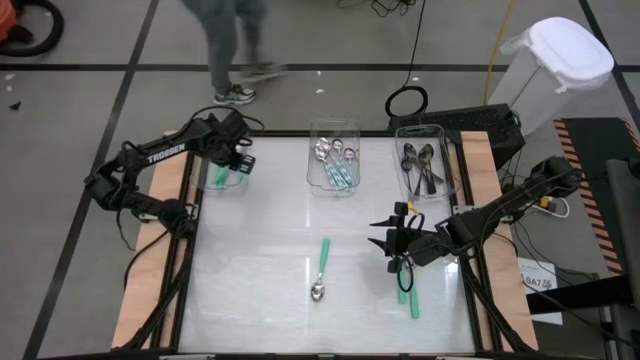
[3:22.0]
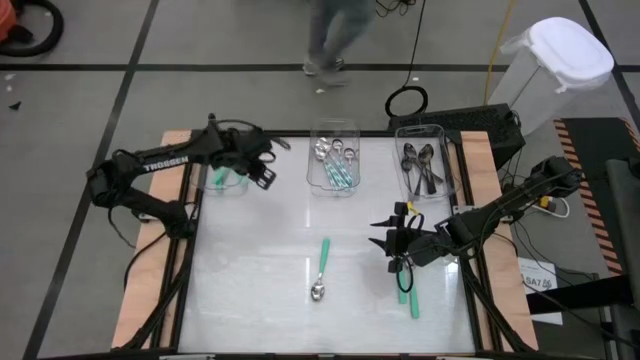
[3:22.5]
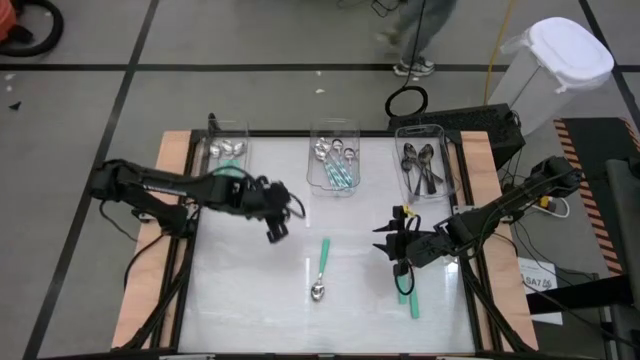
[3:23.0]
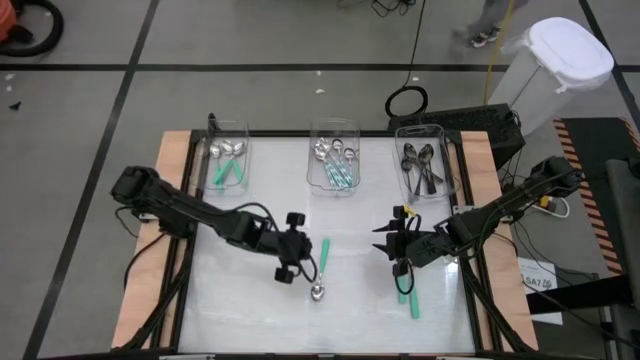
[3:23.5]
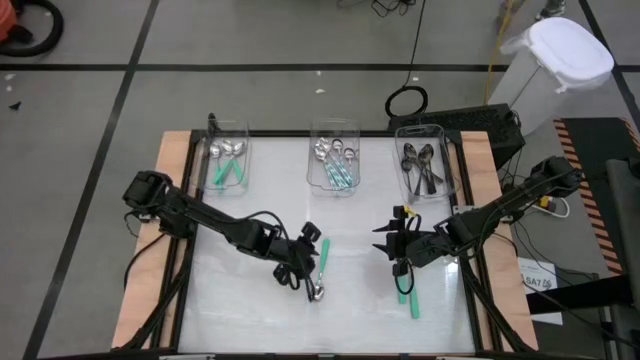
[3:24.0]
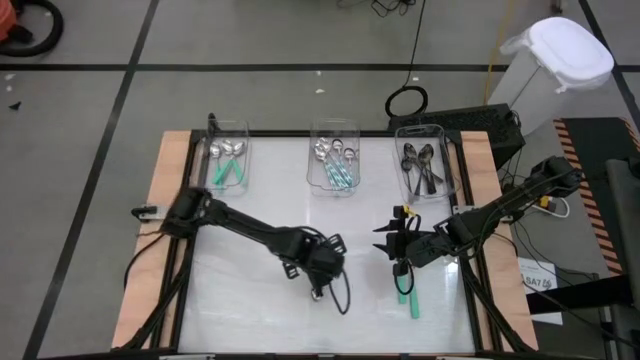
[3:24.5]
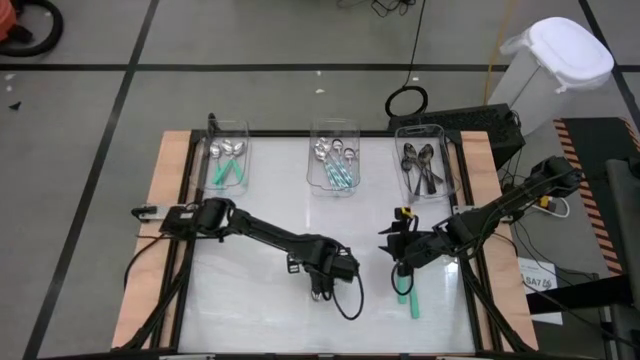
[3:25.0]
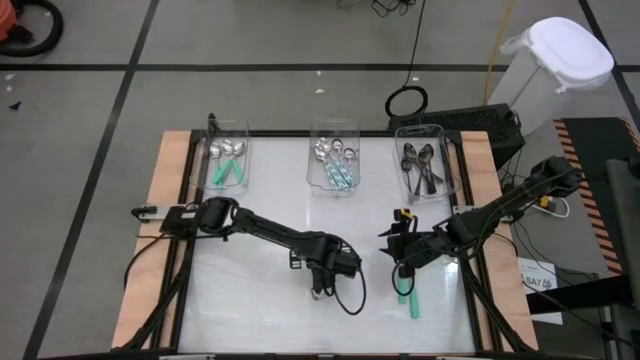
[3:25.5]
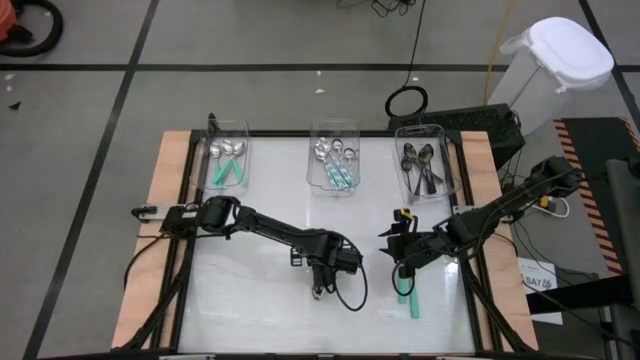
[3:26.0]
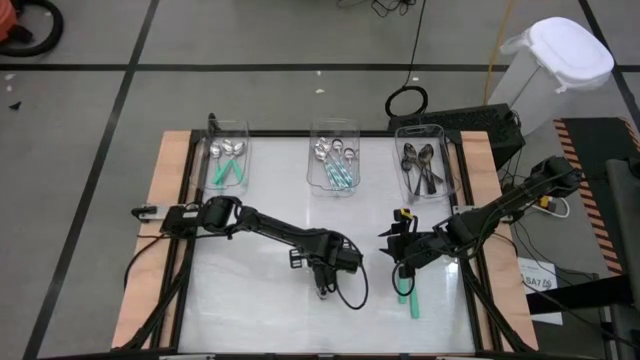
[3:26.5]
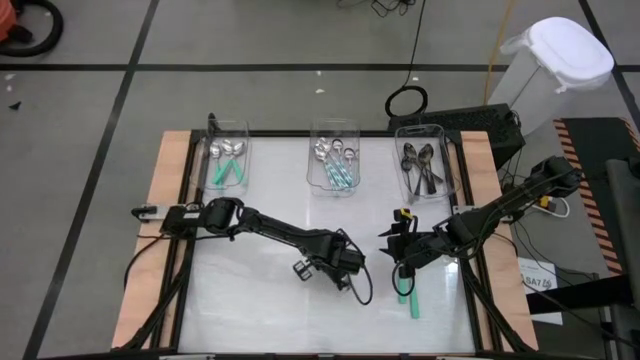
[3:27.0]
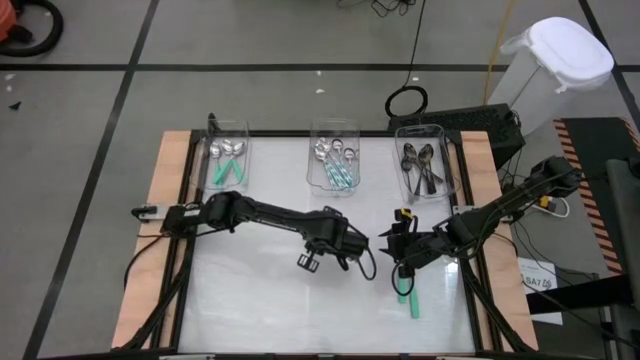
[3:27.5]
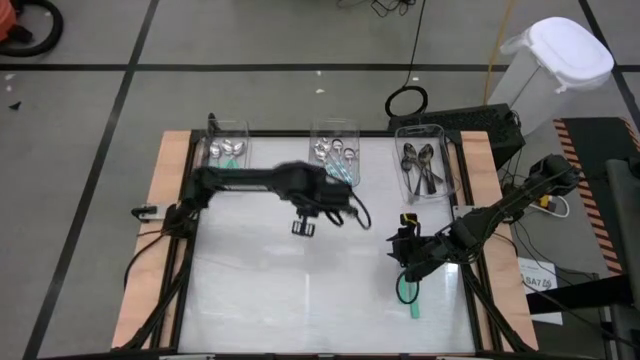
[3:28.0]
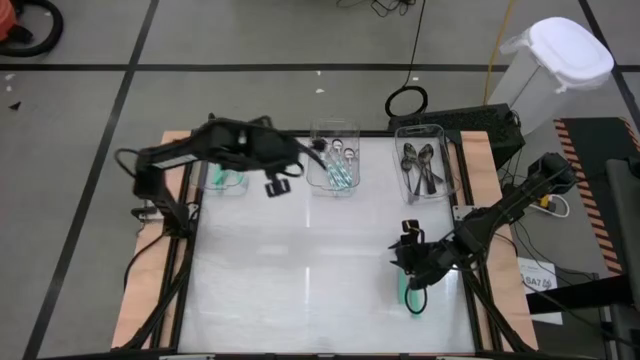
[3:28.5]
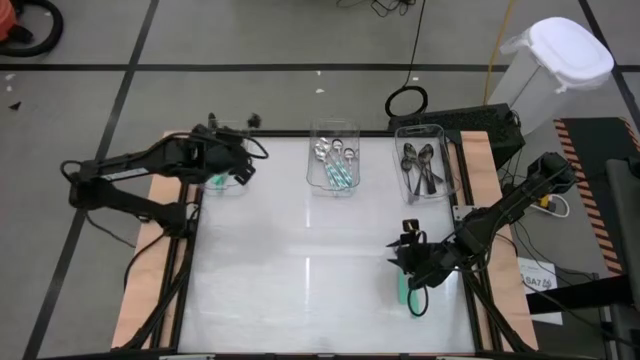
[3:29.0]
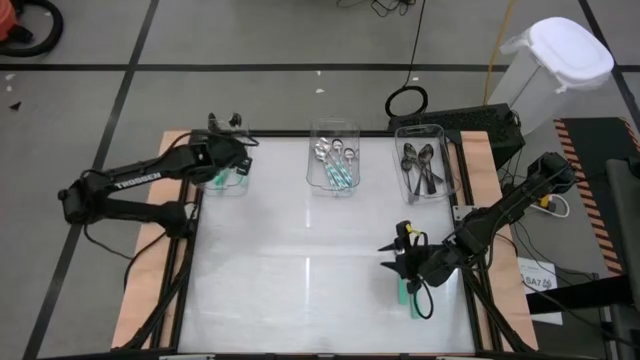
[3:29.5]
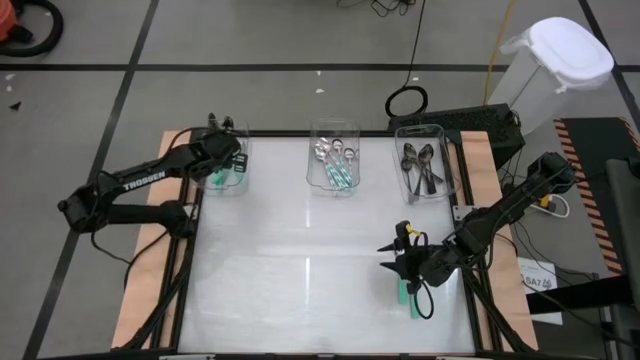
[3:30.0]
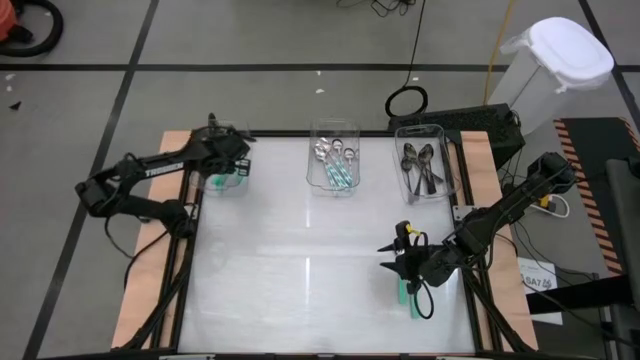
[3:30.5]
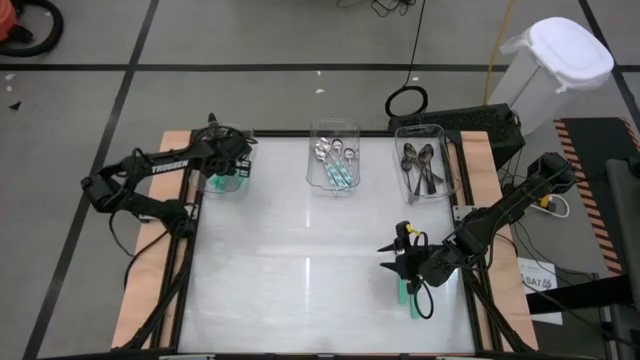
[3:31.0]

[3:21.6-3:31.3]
Task: Sort silverware by color (type)
Put the green spoon into the left transparent bin

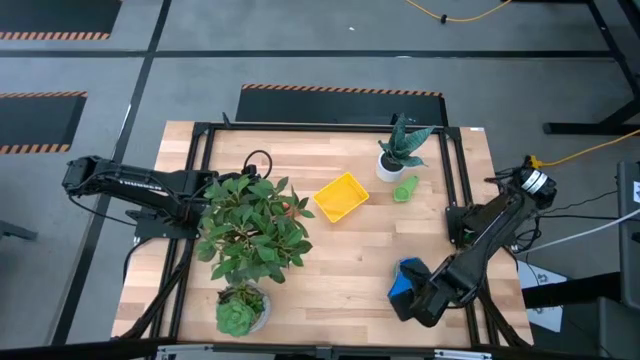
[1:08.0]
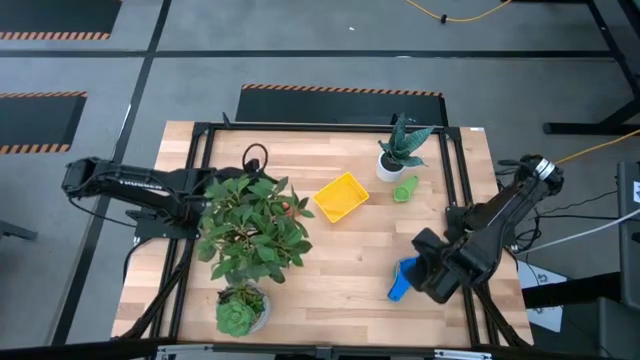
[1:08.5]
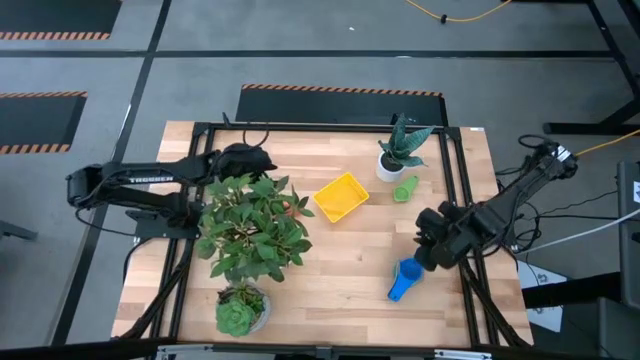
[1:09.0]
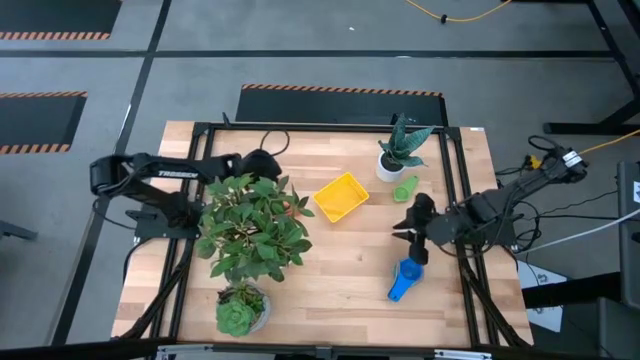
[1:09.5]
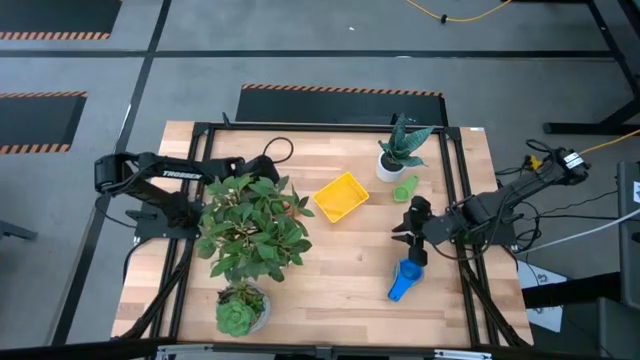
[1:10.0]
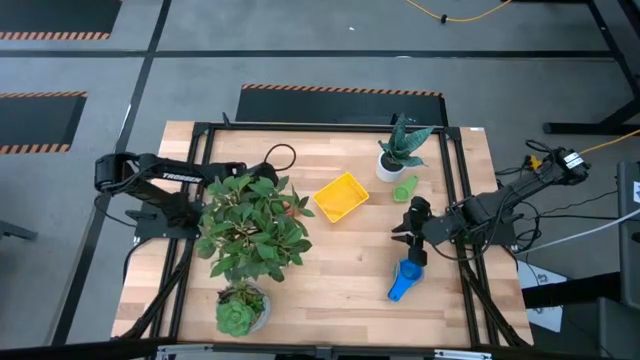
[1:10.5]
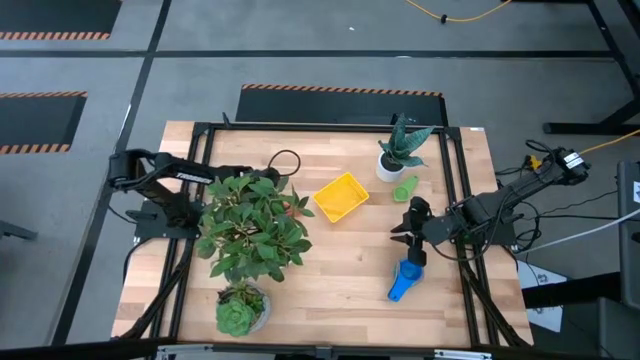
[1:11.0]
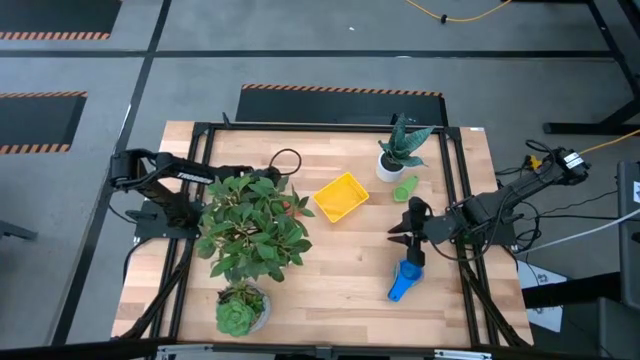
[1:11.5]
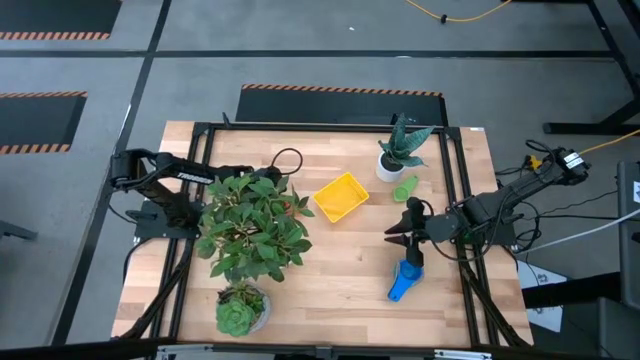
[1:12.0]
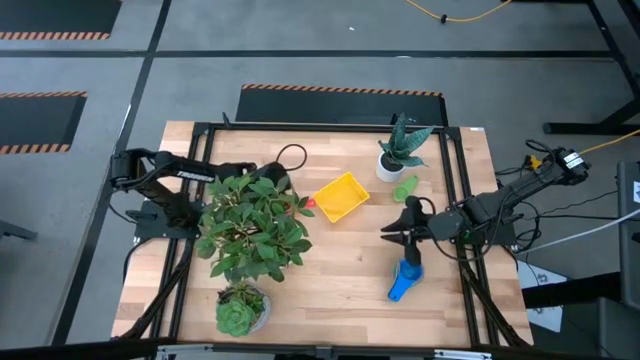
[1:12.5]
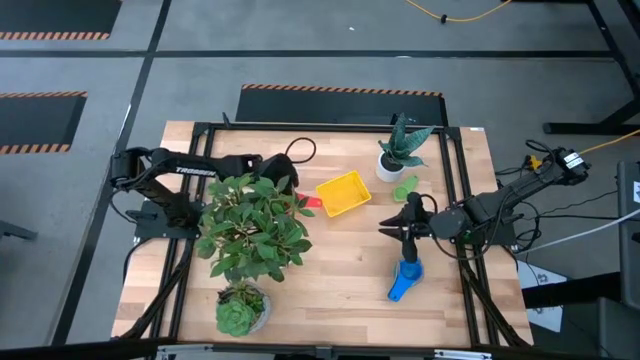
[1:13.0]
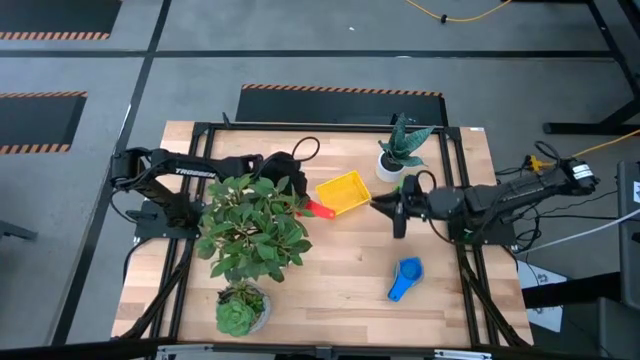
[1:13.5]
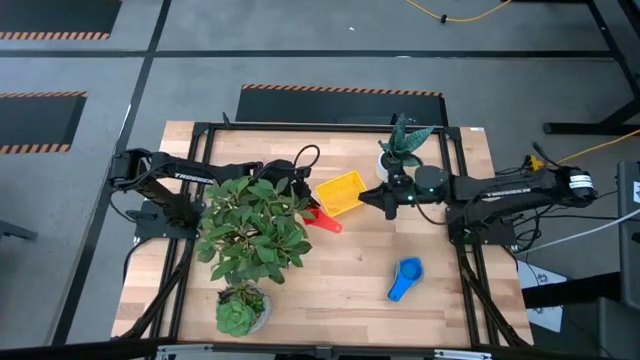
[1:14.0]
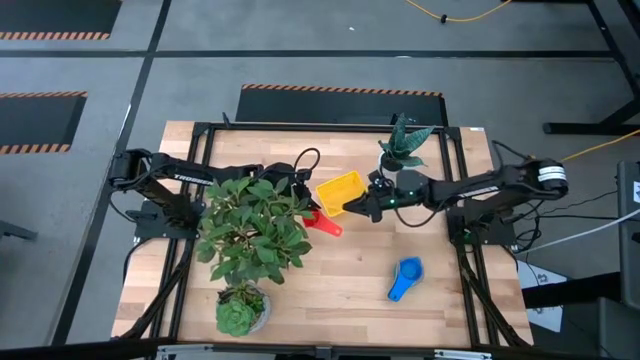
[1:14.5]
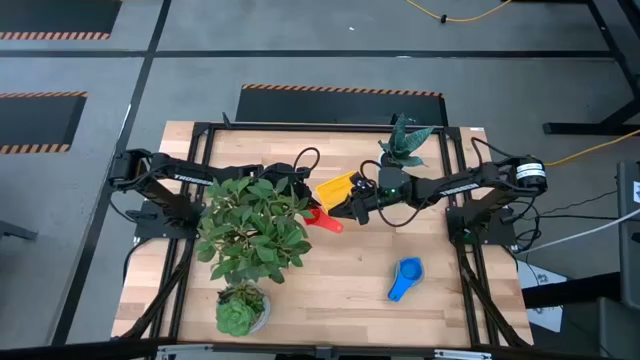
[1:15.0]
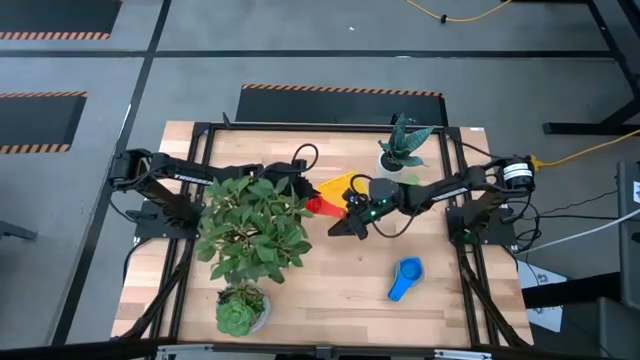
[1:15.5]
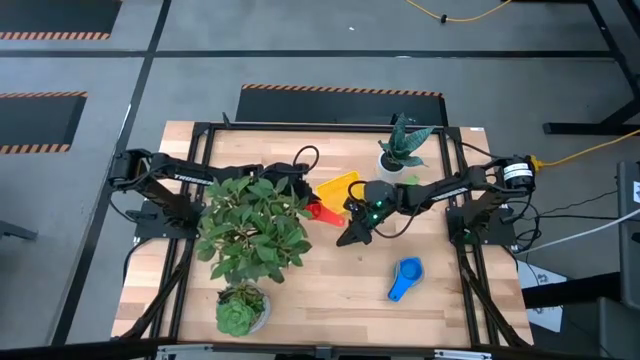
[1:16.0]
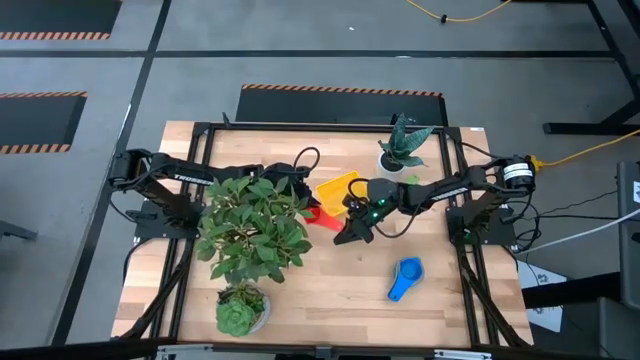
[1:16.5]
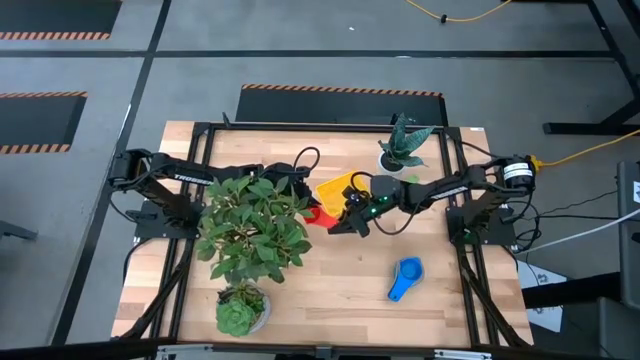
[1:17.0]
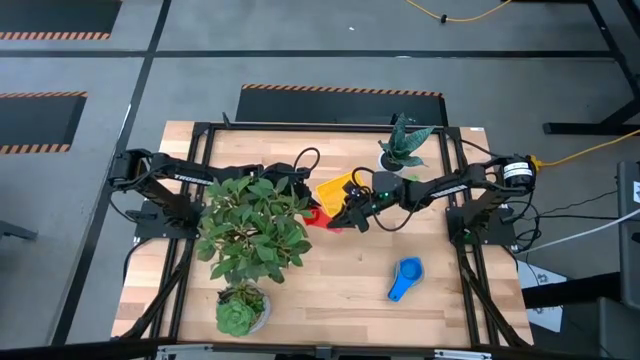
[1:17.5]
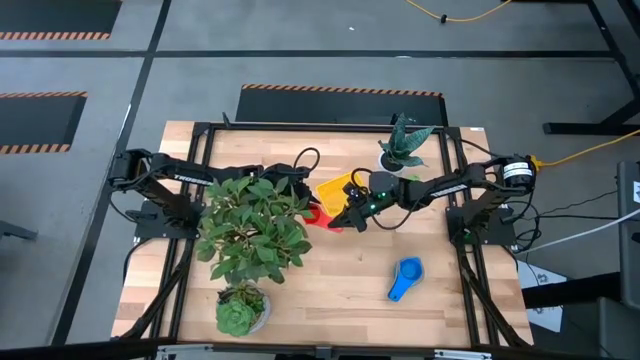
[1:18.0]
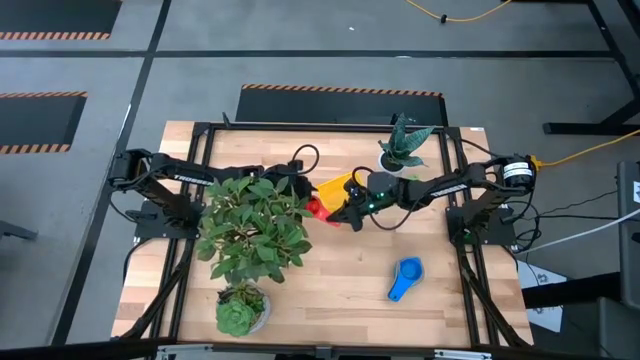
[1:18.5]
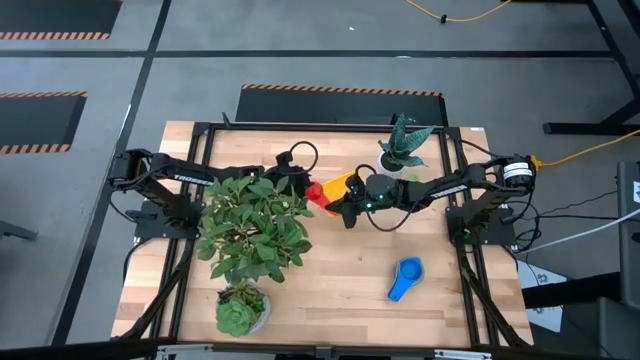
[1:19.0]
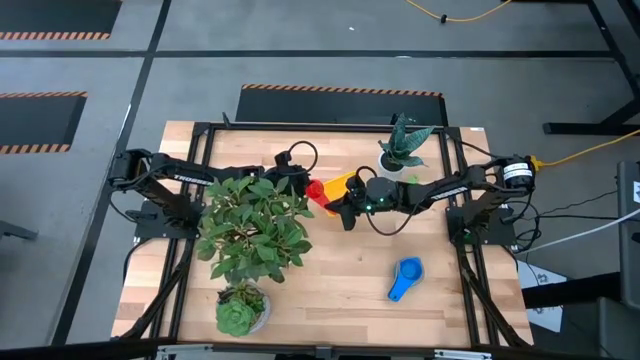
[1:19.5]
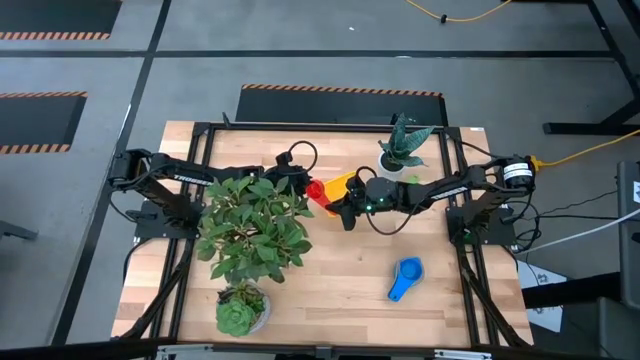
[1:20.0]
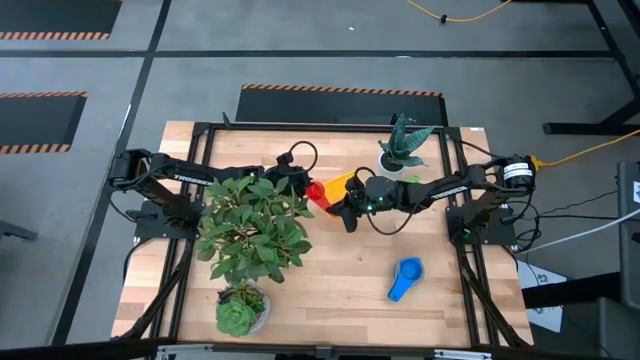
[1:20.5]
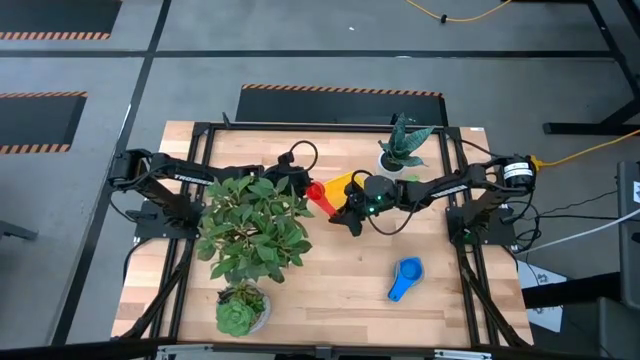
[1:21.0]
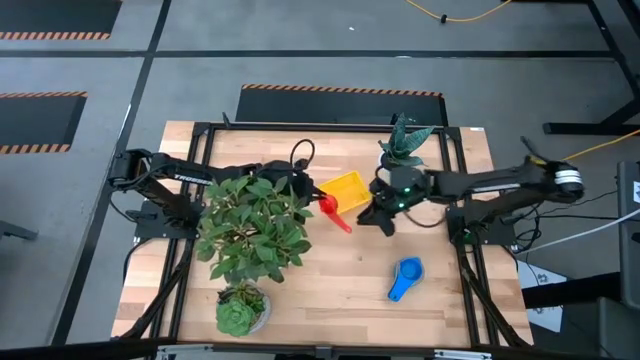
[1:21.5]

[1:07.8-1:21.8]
Task: Nest measuring cups in basket
Stack the red measuring cup on top of the blue measuring cup
